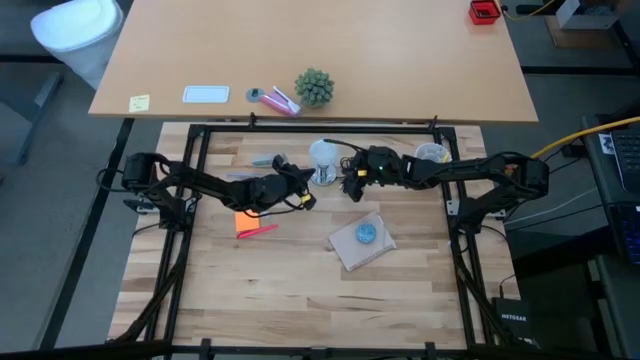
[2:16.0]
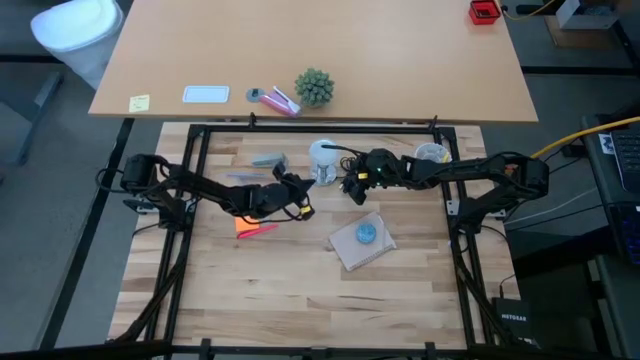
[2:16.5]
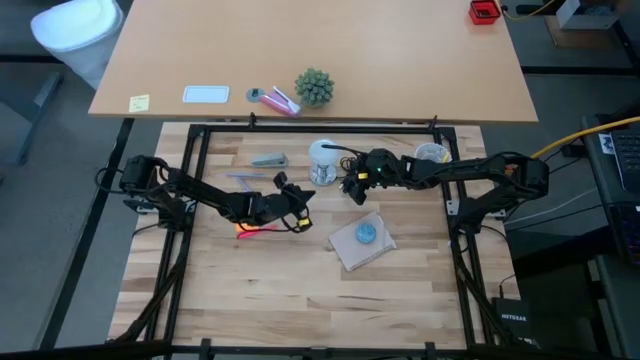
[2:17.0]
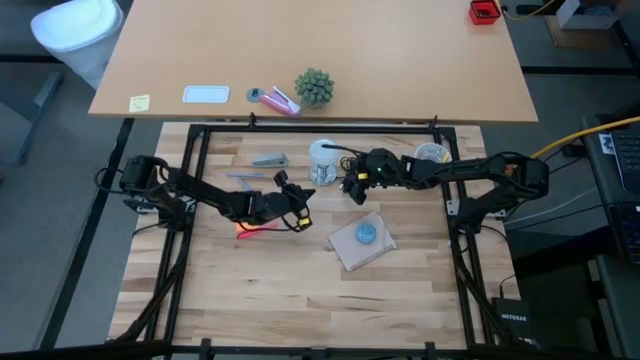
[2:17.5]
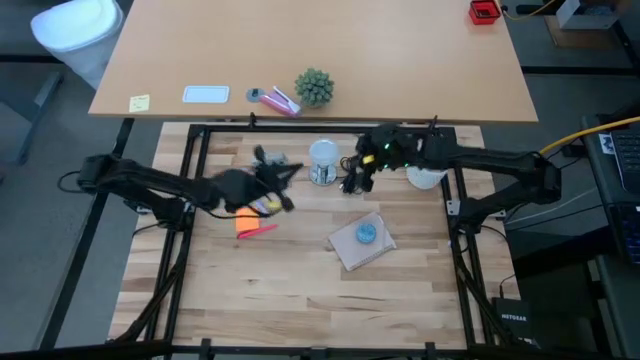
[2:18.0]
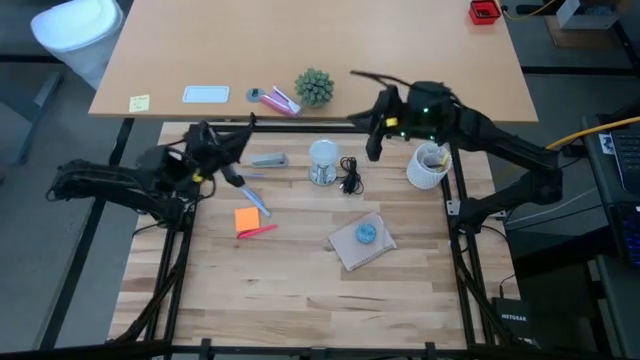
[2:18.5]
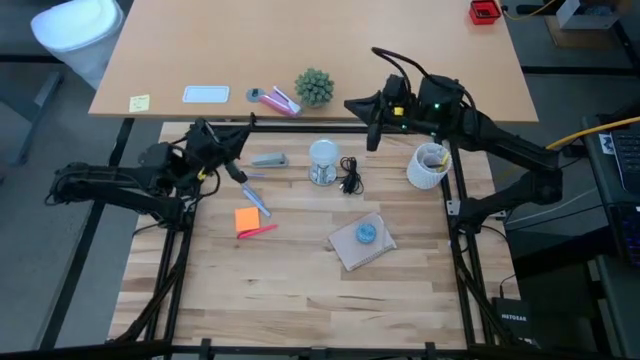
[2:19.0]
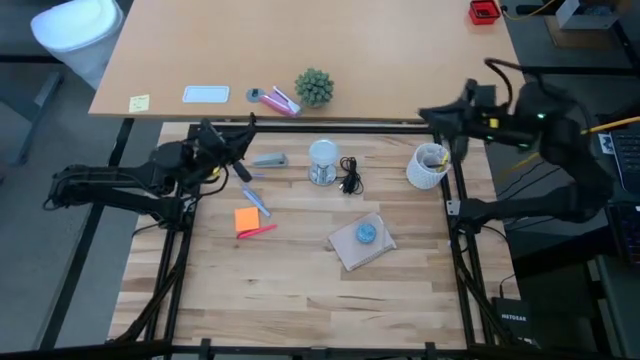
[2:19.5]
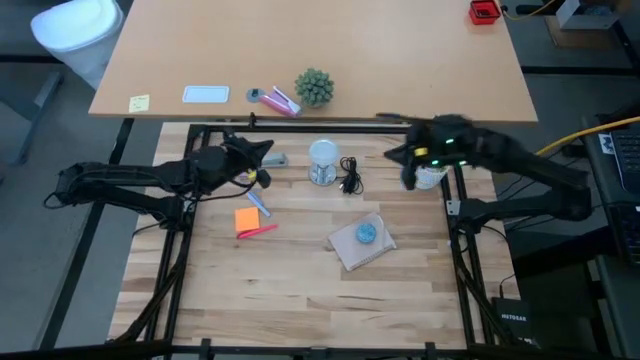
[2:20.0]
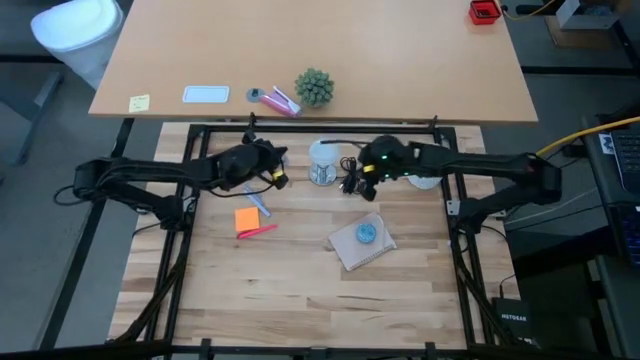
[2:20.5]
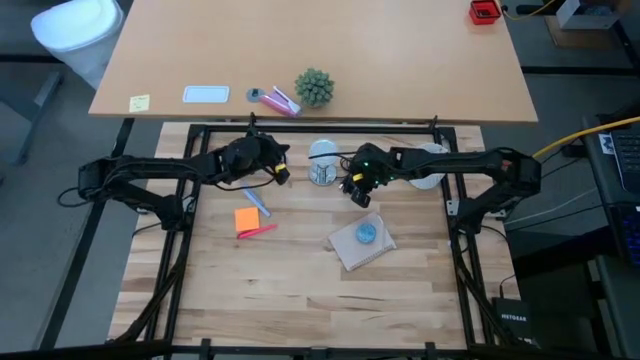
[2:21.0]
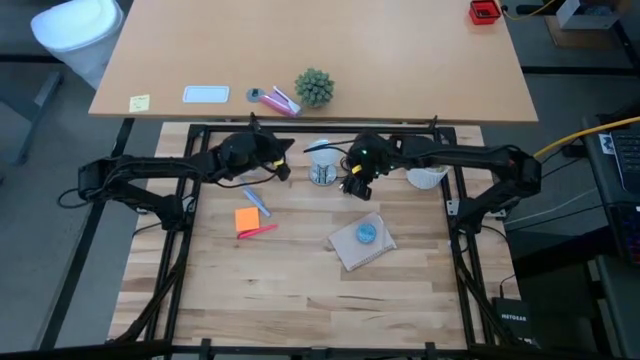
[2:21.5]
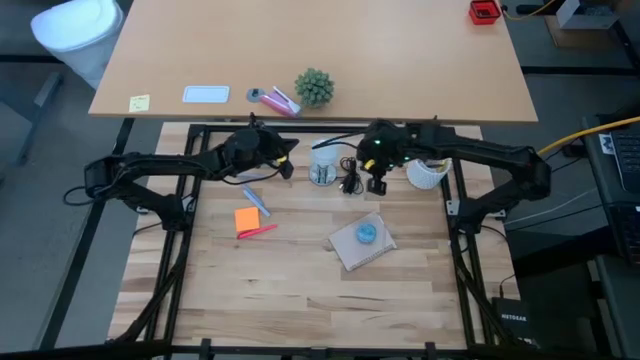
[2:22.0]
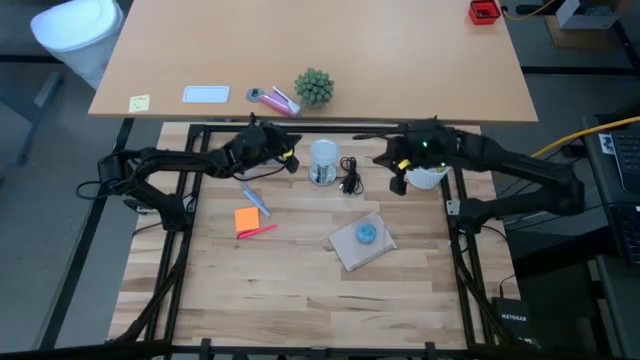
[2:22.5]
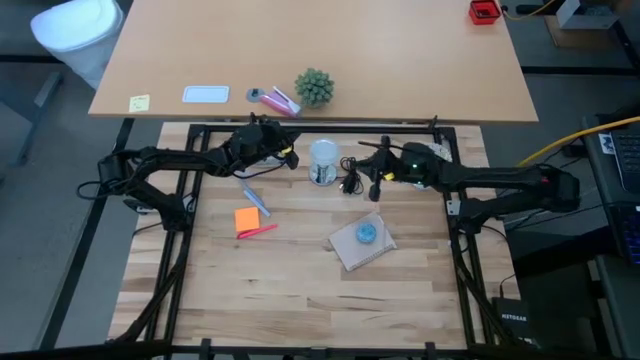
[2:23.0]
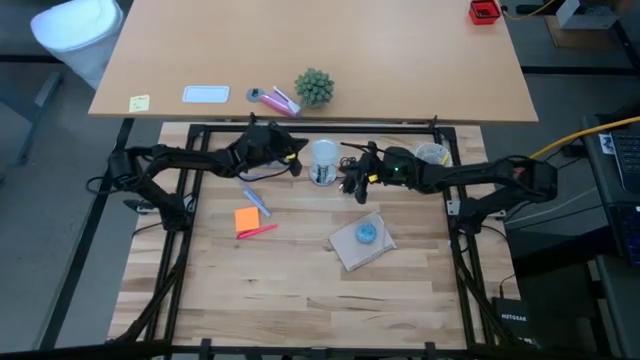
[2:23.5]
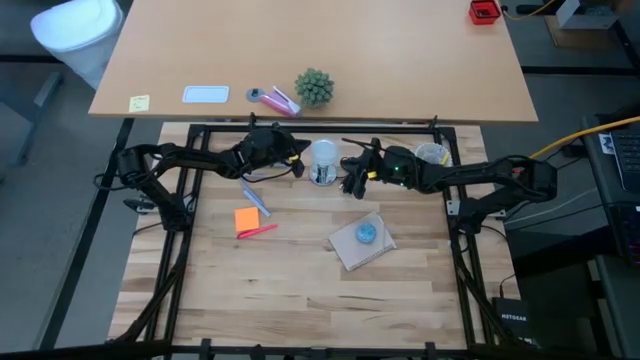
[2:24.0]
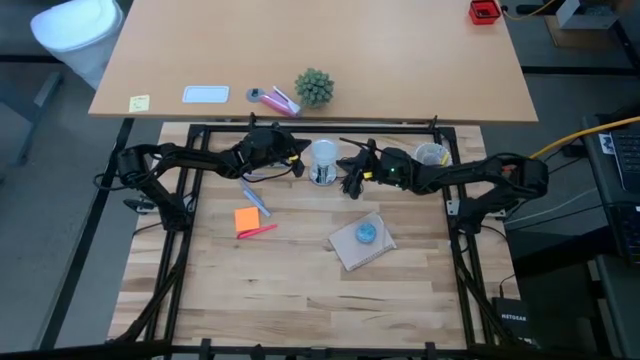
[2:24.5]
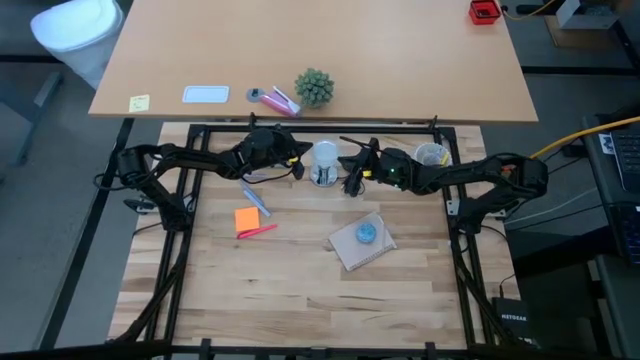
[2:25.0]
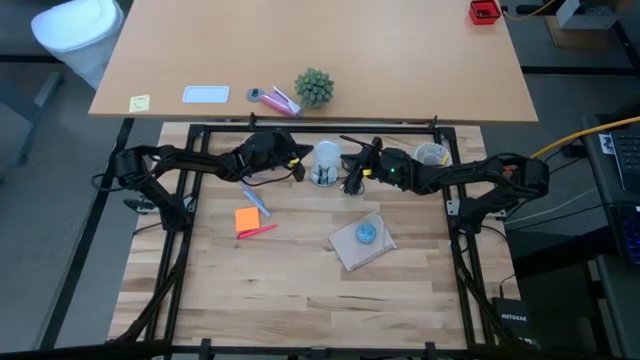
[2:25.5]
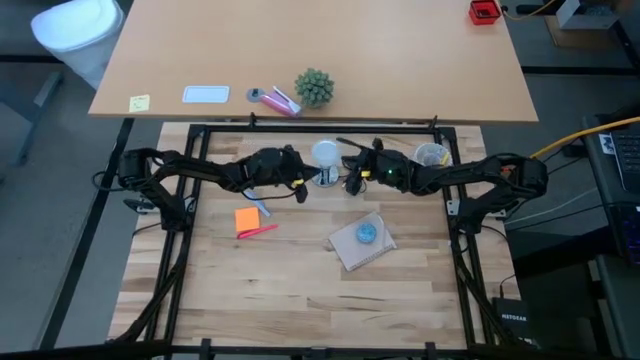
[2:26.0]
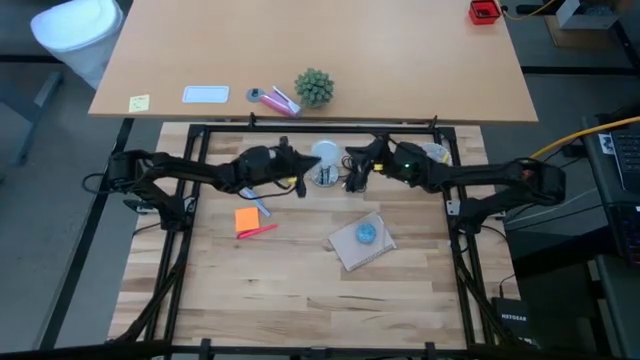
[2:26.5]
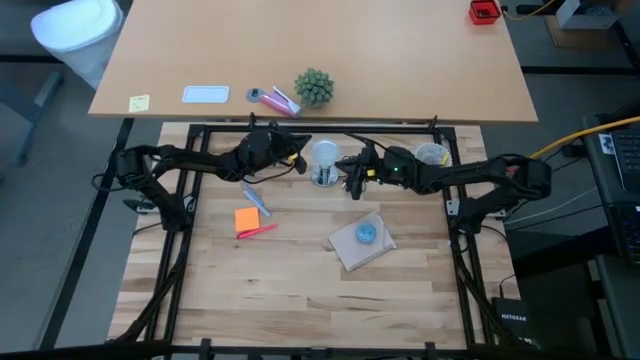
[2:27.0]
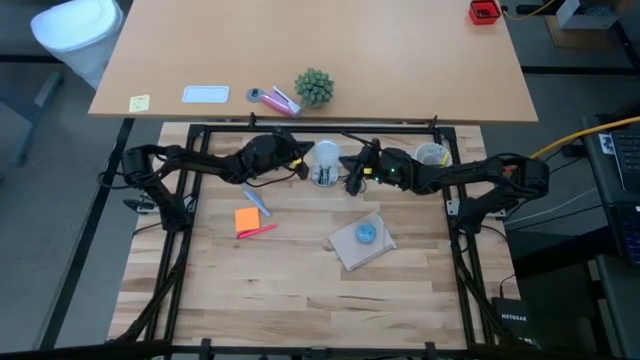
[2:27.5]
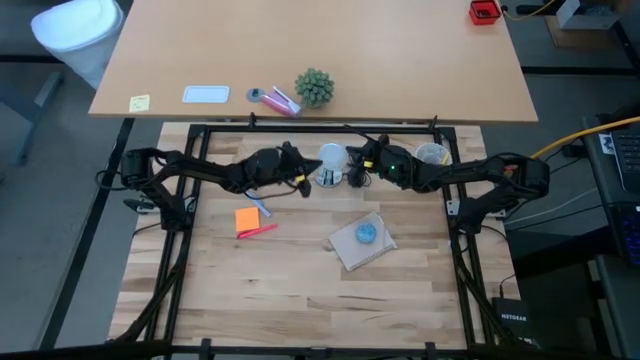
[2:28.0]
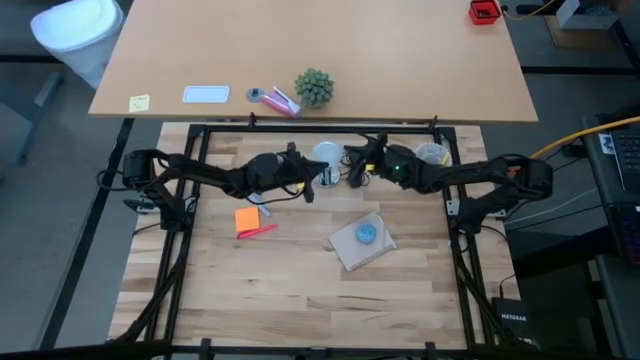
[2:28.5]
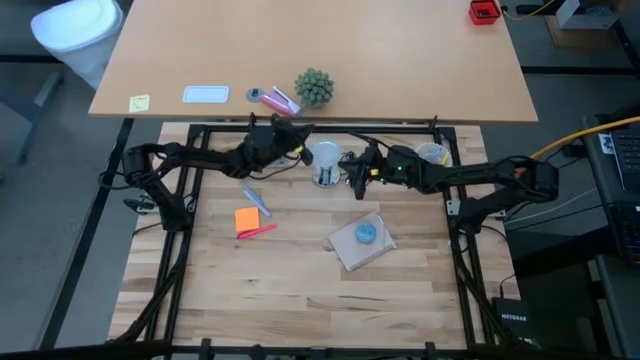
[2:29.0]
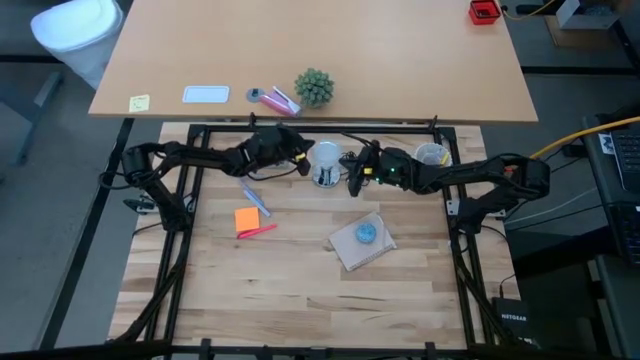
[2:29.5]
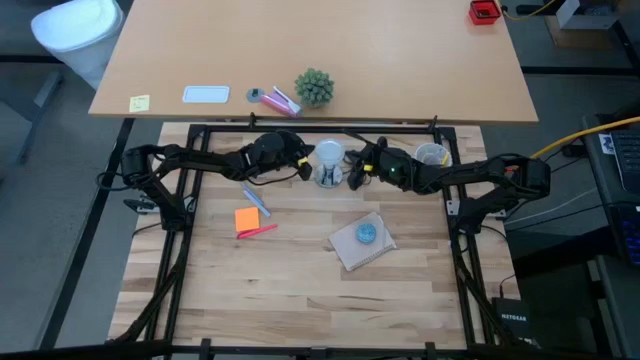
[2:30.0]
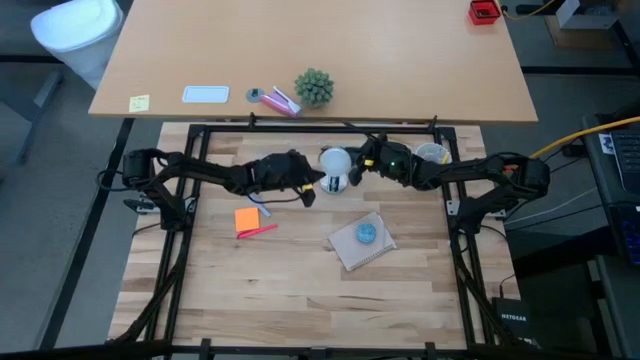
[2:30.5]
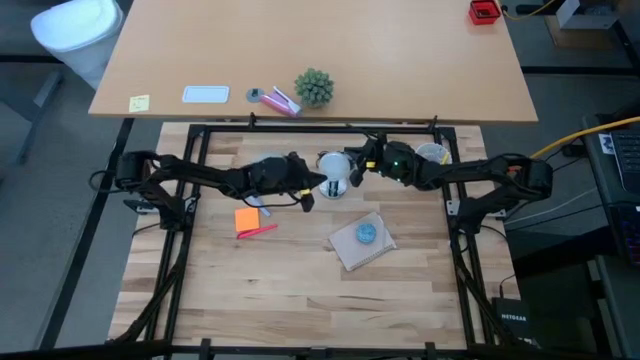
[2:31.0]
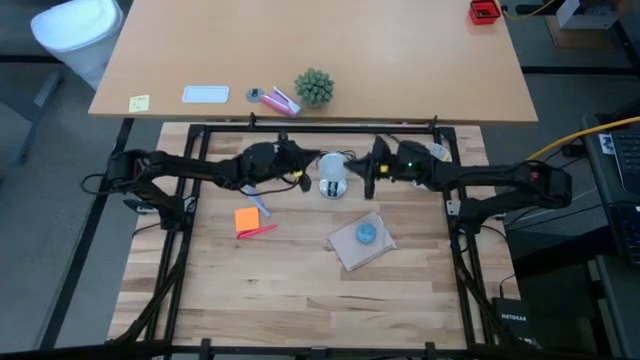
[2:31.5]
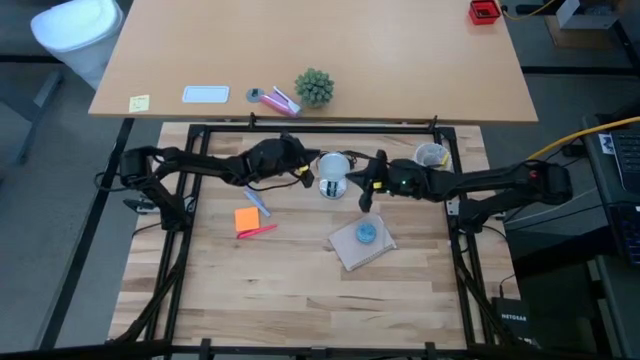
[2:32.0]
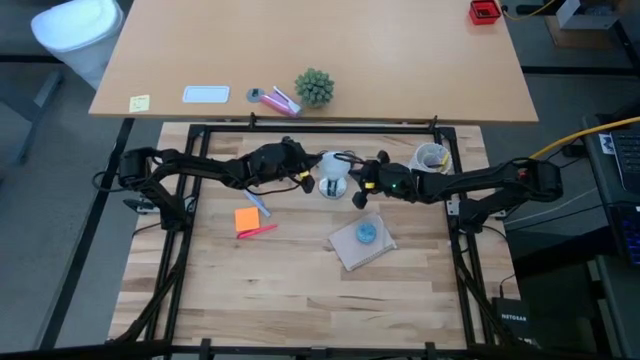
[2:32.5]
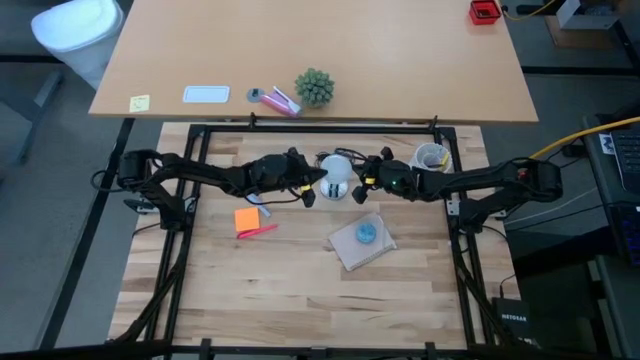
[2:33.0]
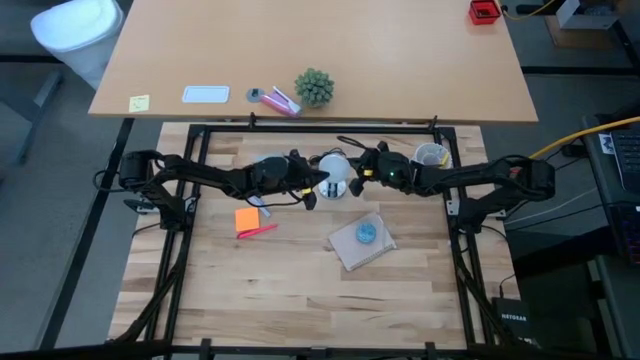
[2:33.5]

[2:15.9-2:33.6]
Task: Screw lightbulb
Remove the lightbulb from the lamp

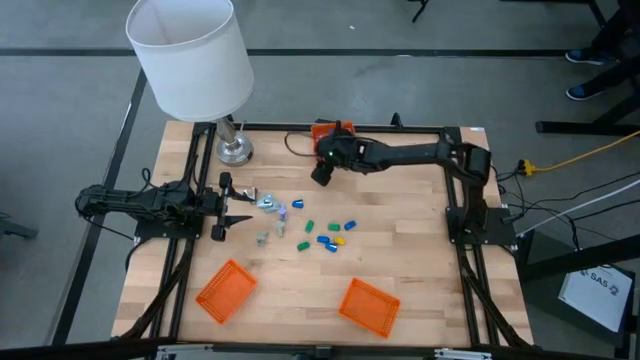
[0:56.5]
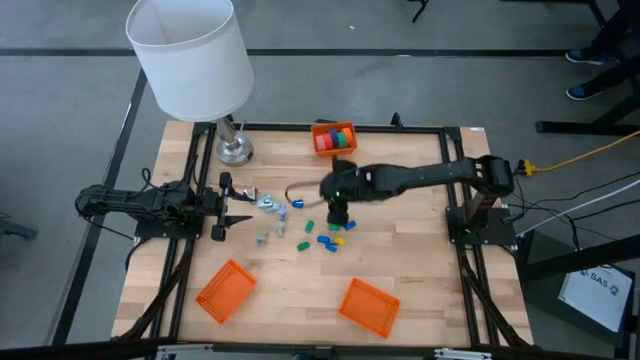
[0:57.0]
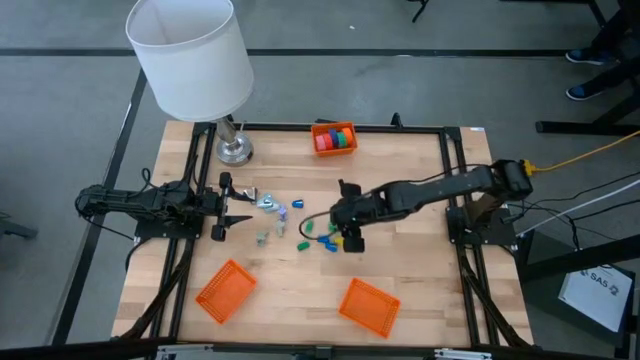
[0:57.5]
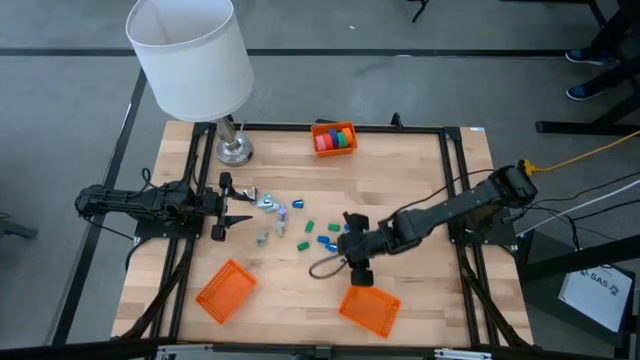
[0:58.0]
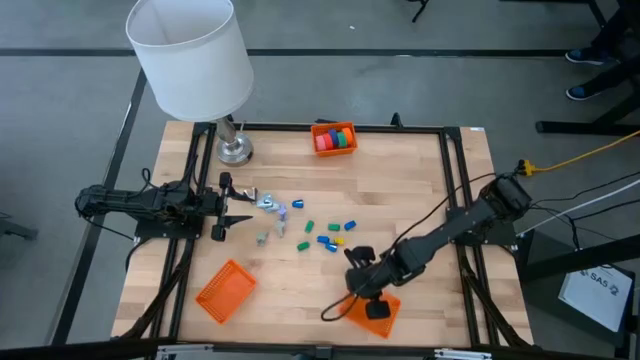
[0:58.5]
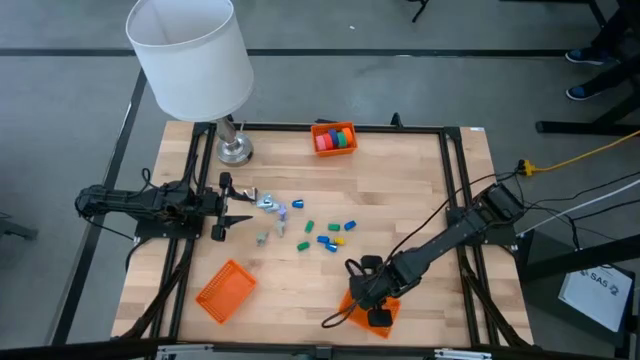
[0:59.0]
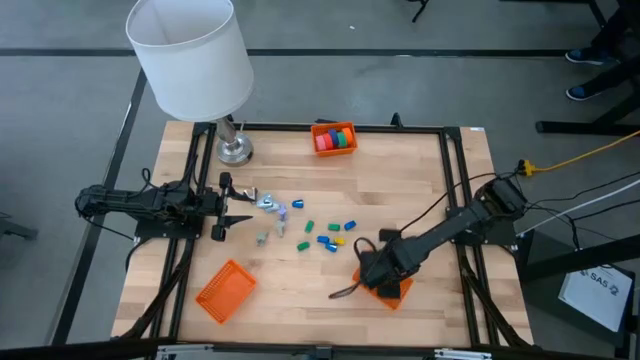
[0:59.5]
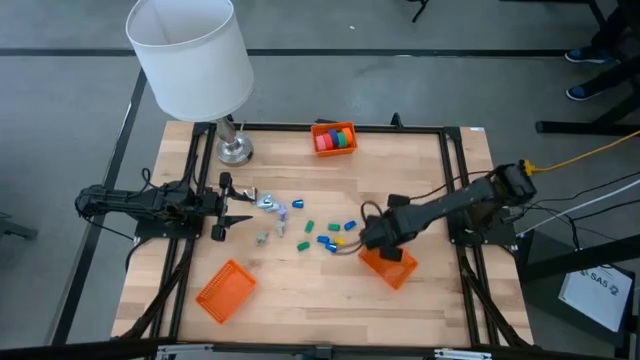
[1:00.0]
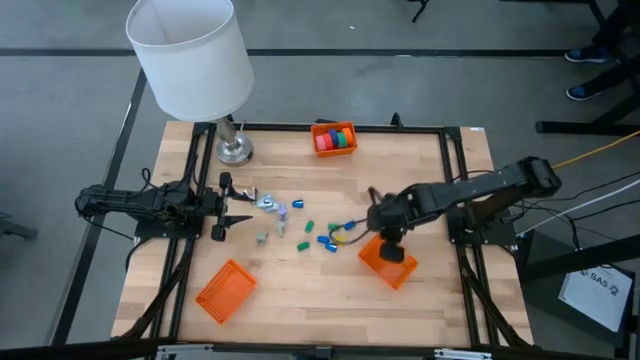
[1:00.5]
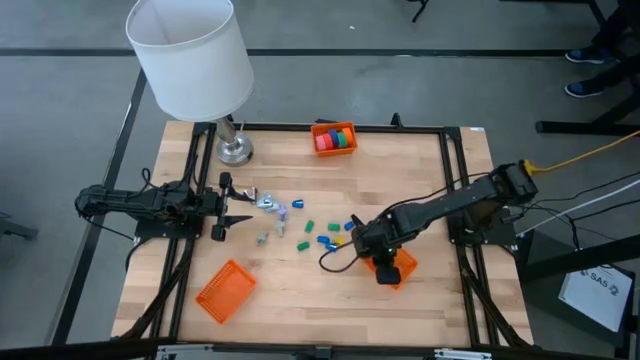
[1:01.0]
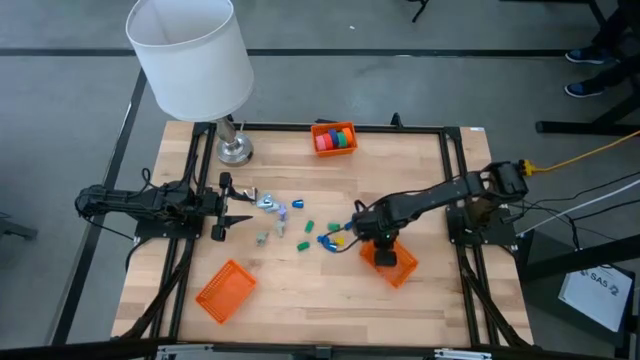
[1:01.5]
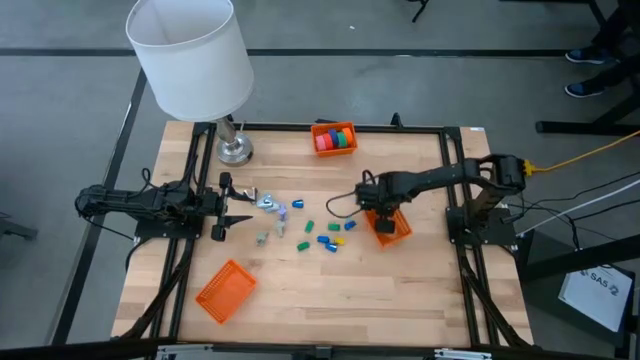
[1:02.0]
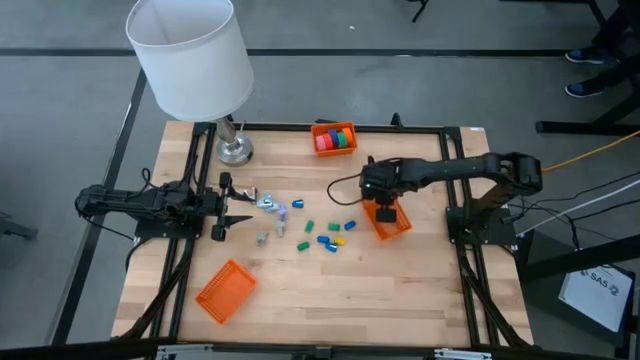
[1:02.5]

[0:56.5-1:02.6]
Task: Pick and place Stapler, Stapler remover, tape
Move the bottom right orange bin to the middle side of the table
